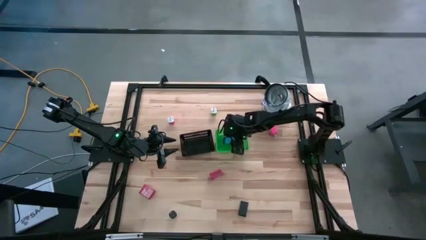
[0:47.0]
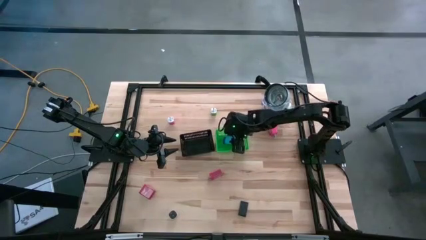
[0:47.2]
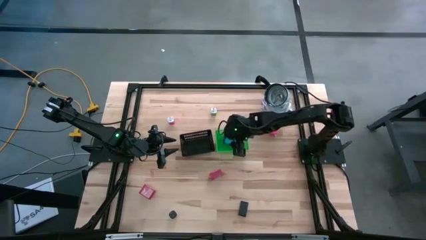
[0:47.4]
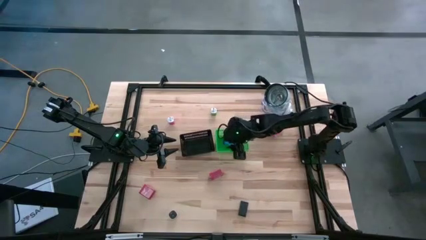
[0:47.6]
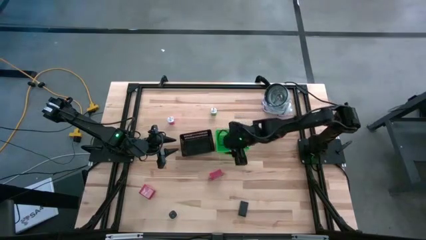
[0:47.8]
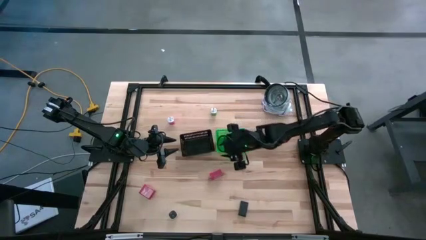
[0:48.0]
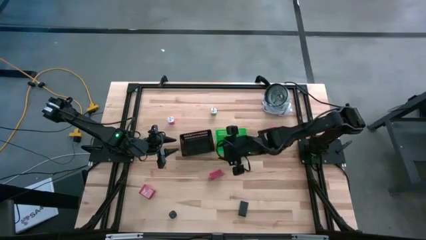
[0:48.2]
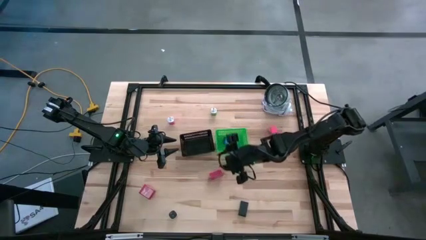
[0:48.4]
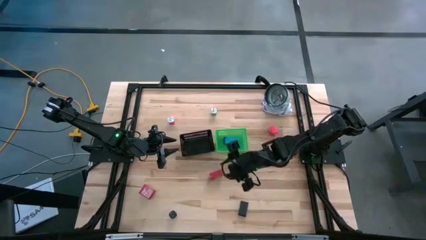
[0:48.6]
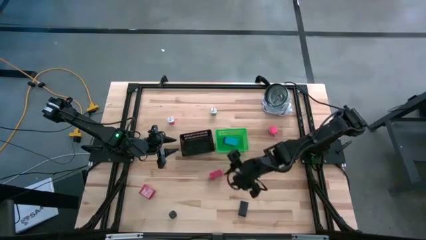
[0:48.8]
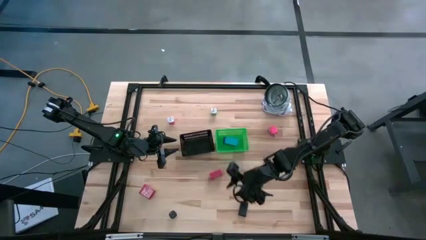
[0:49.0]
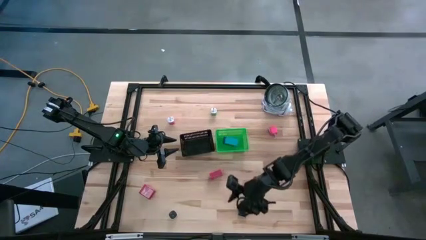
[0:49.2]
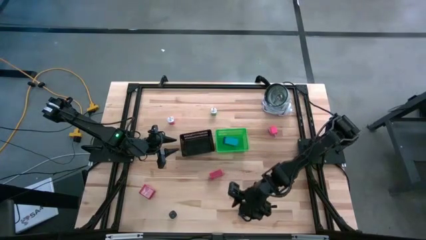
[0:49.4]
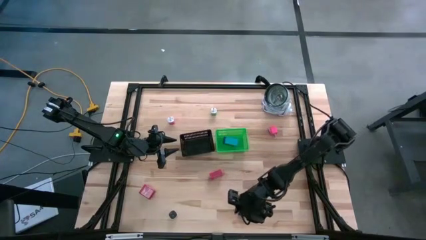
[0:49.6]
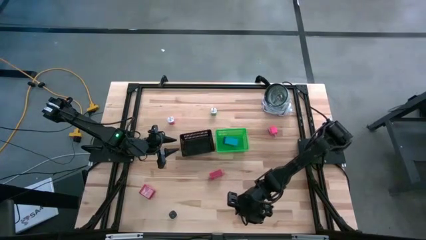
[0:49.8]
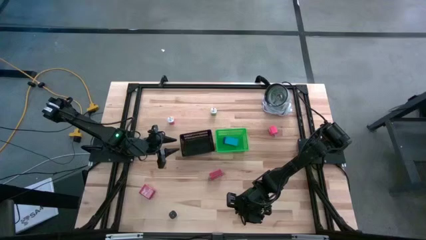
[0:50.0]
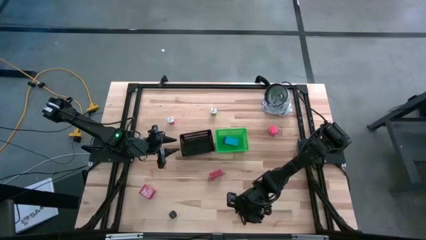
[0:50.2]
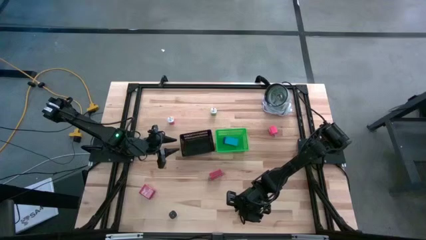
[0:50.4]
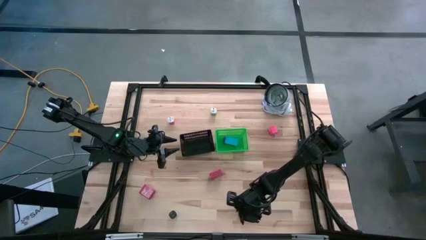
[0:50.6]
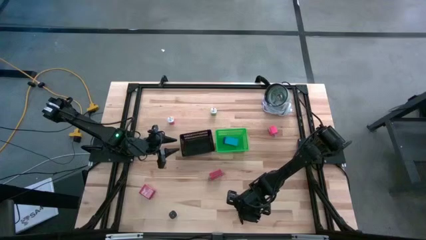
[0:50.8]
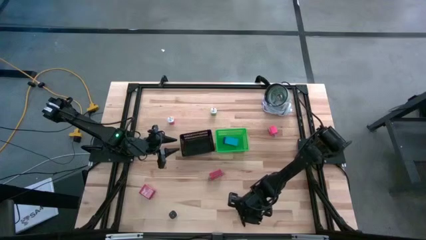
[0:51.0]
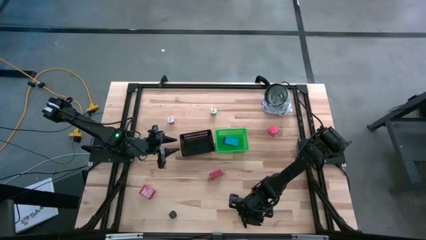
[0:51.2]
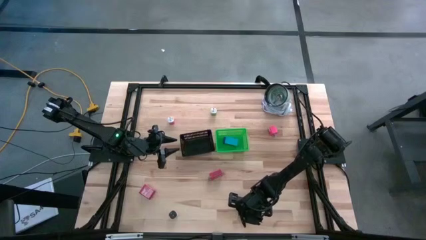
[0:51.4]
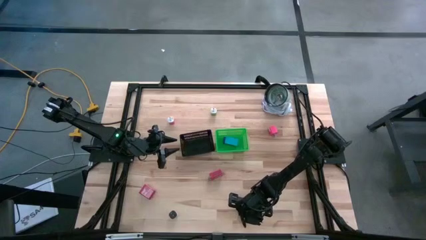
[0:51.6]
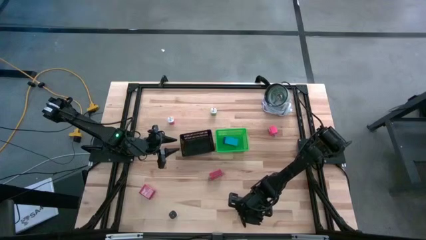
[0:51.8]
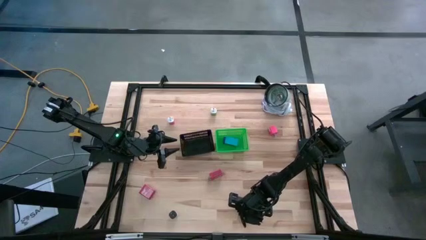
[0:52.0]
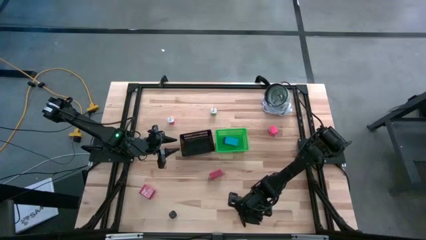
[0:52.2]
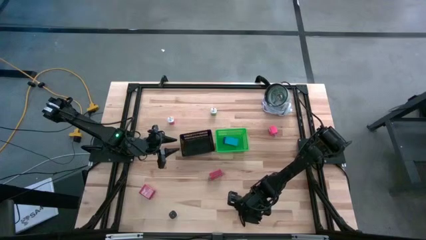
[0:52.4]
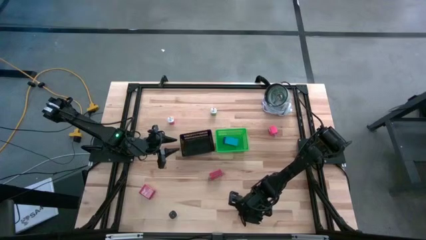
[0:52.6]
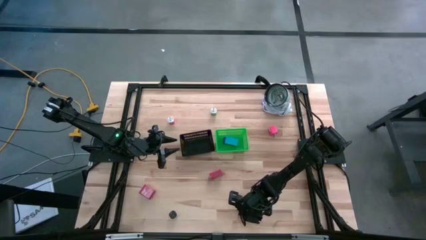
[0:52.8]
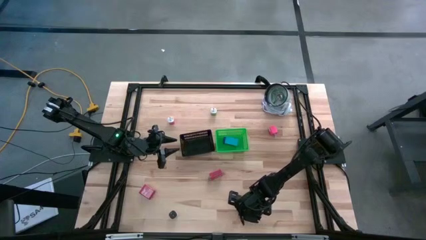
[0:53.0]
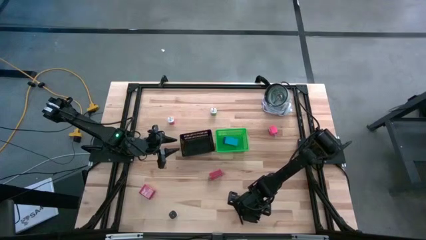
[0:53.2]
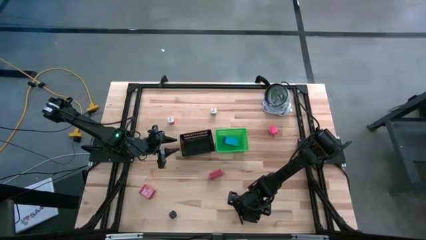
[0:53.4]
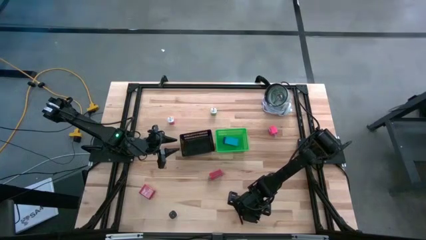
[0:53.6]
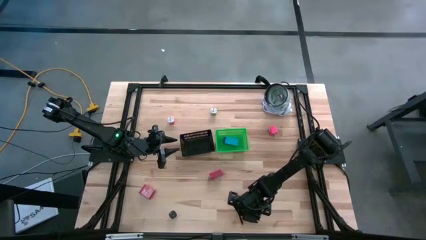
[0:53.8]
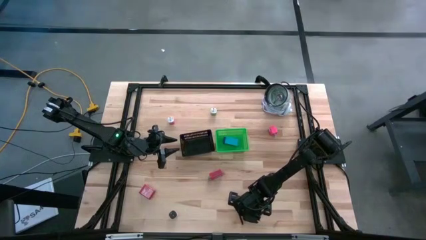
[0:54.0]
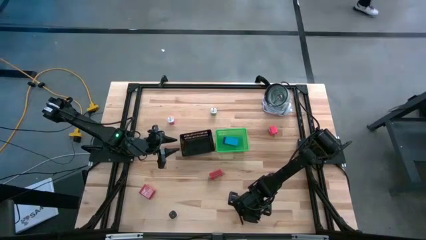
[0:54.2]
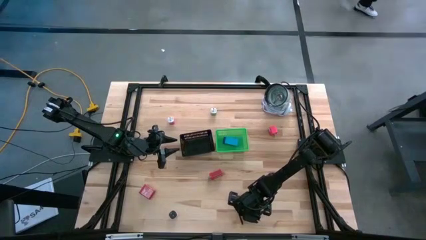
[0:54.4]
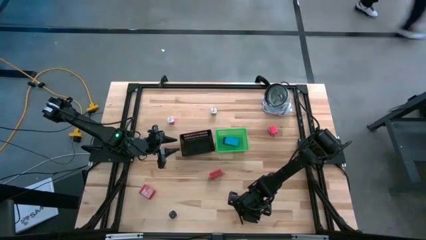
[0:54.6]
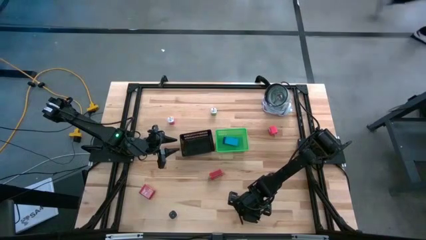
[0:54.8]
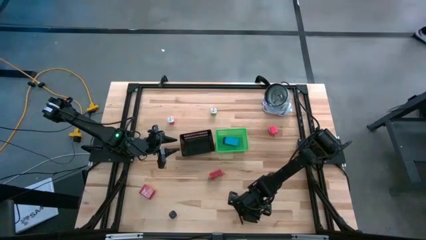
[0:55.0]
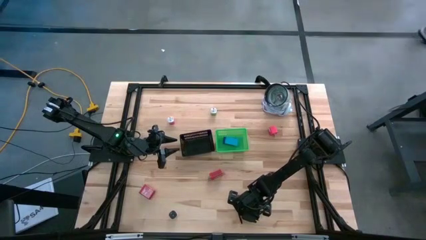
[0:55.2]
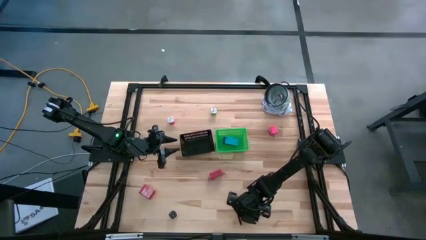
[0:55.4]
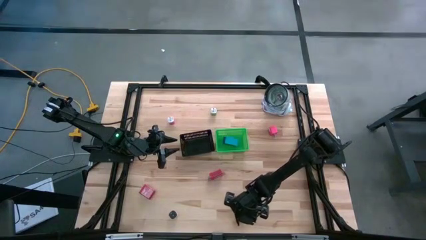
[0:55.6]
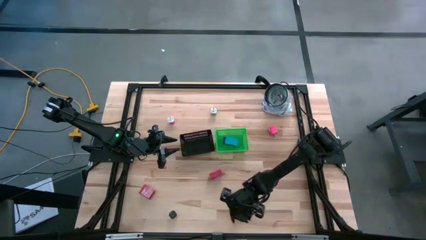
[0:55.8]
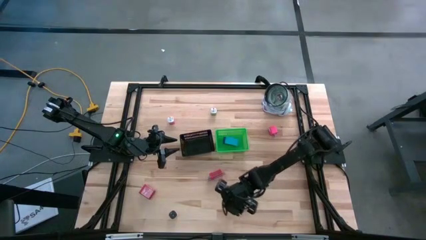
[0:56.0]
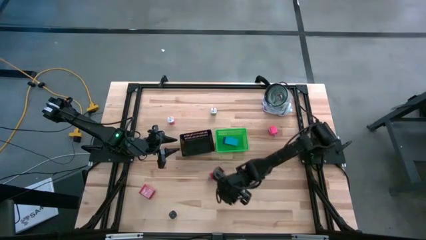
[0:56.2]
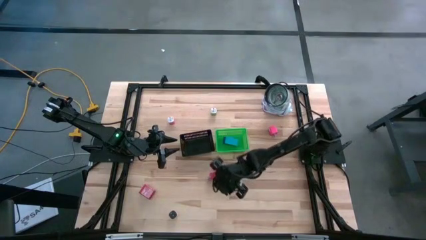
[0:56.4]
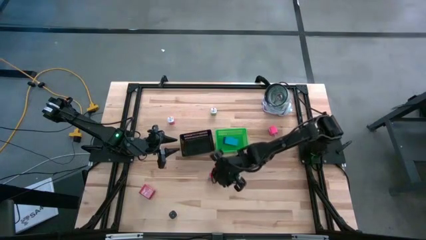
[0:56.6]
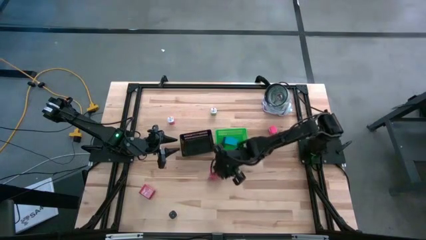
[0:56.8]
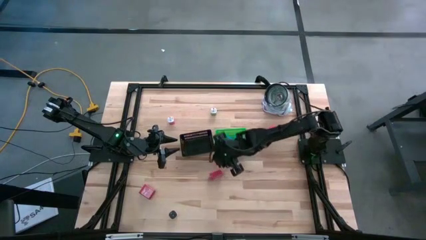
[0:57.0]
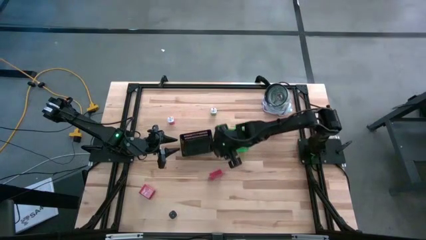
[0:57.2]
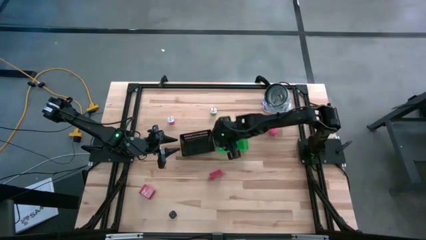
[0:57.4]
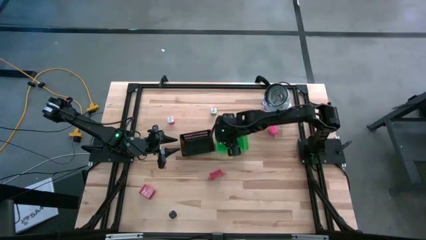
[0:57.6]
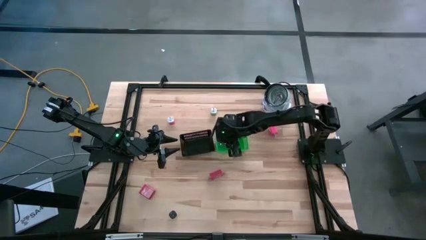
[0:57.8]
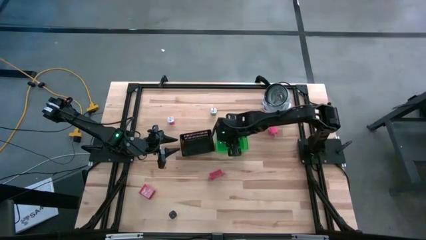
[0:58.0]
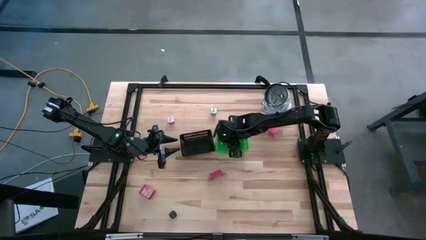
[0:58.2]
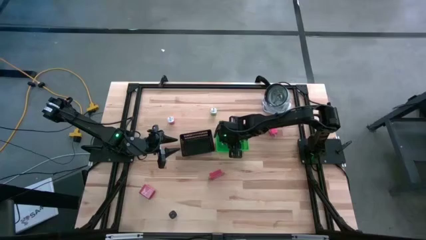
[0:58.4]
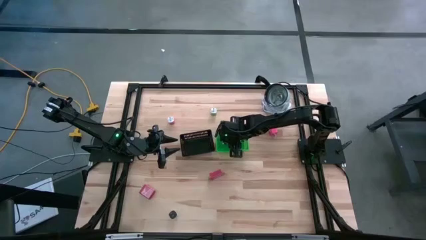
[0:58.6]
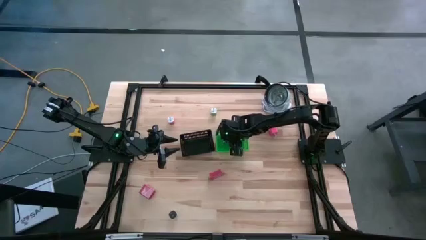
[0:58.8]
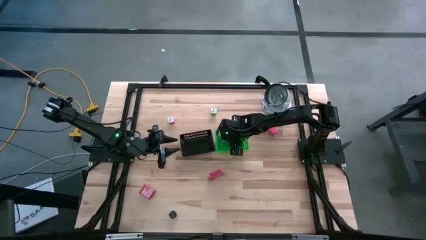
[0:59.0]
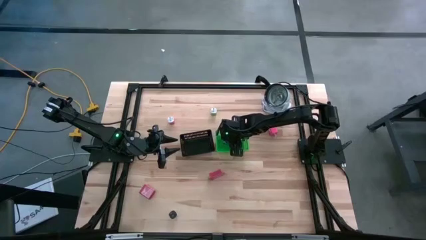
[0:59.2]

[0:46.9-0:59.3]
Task: Pick & Place Office items
Put the black digital timer into the green bin

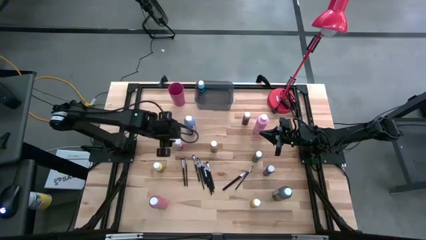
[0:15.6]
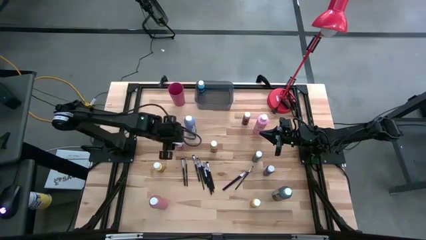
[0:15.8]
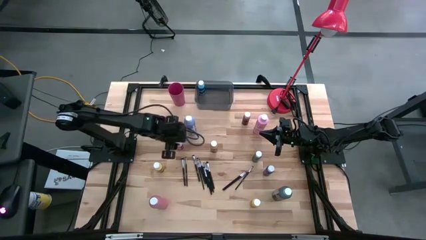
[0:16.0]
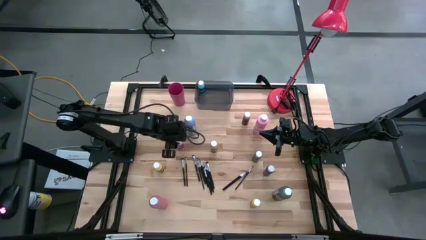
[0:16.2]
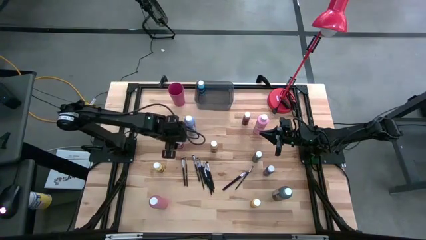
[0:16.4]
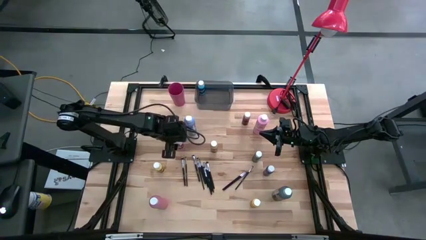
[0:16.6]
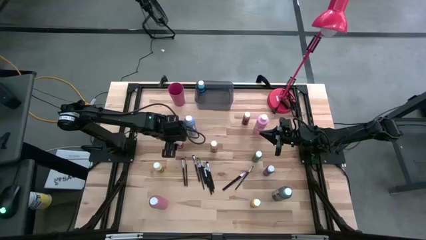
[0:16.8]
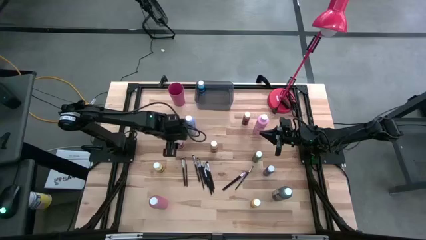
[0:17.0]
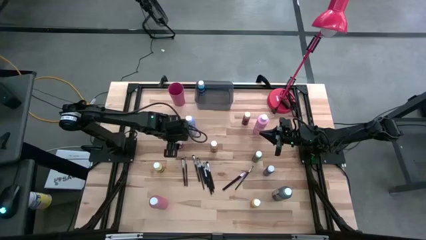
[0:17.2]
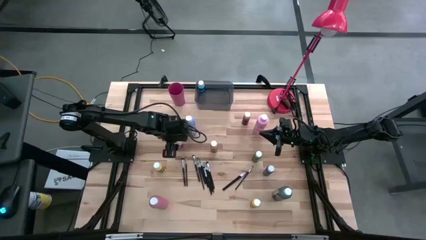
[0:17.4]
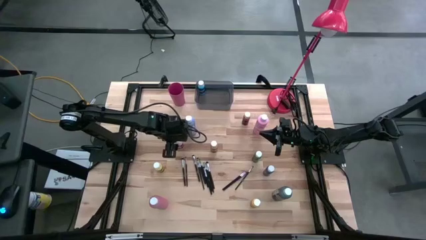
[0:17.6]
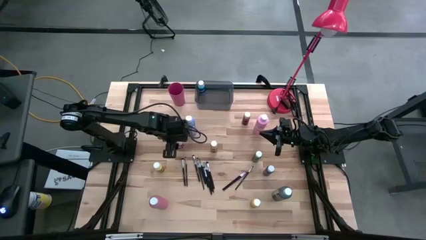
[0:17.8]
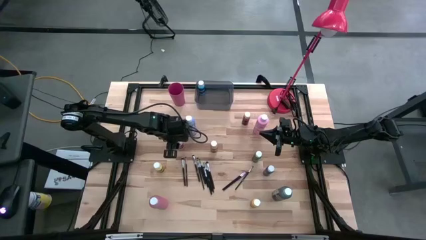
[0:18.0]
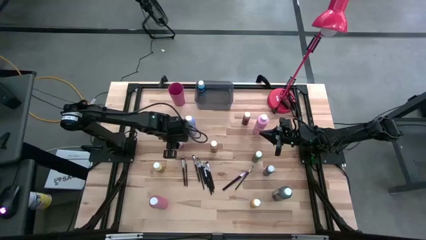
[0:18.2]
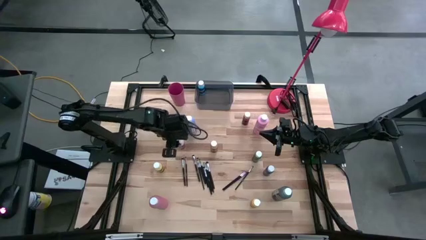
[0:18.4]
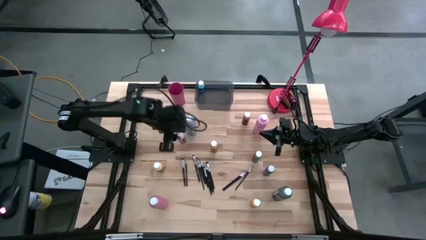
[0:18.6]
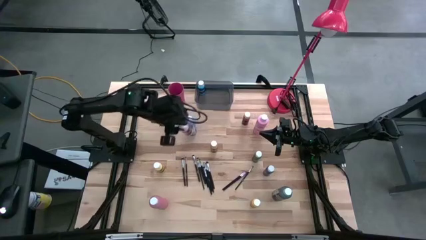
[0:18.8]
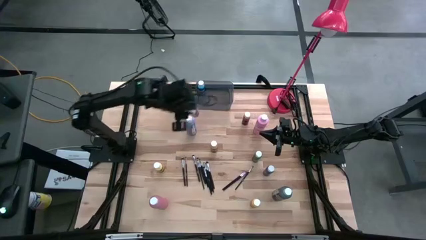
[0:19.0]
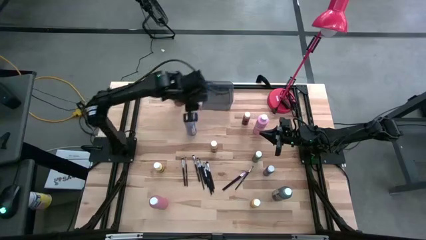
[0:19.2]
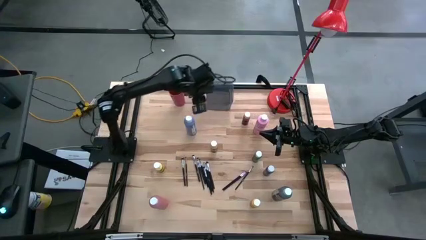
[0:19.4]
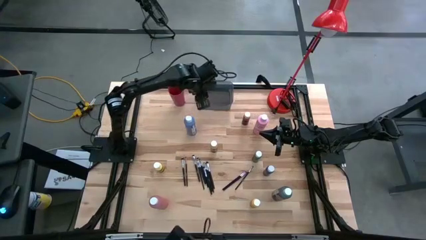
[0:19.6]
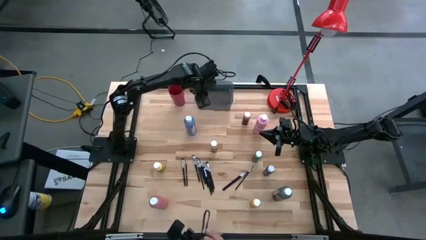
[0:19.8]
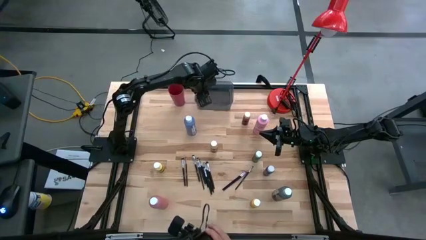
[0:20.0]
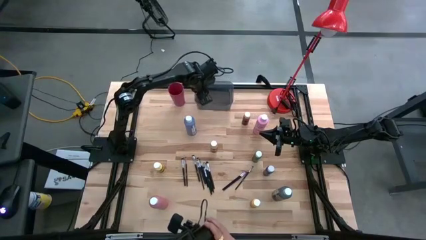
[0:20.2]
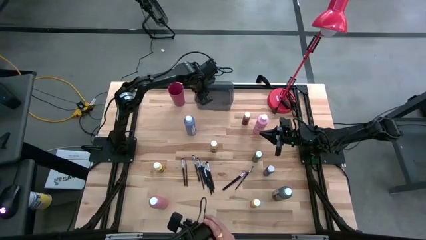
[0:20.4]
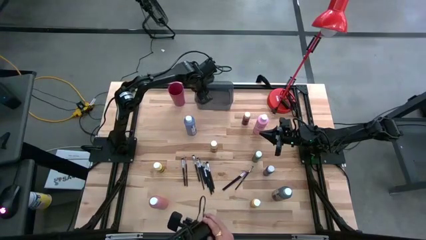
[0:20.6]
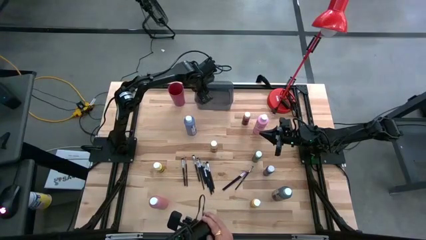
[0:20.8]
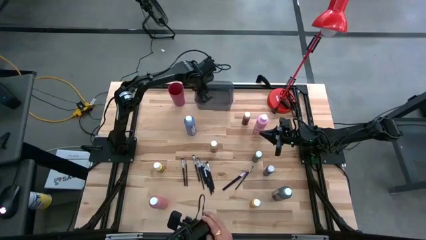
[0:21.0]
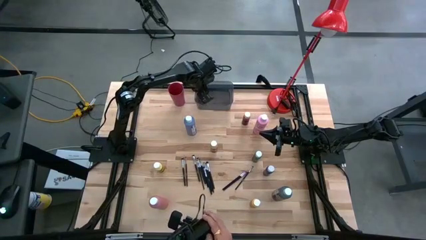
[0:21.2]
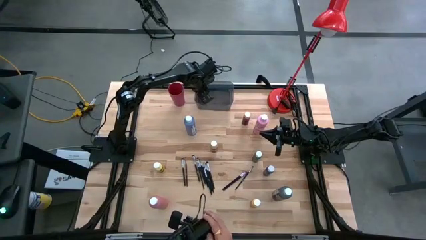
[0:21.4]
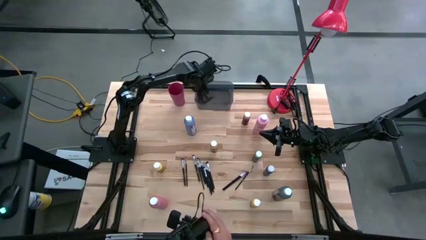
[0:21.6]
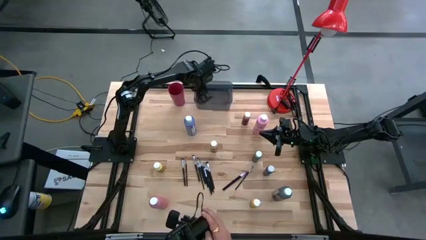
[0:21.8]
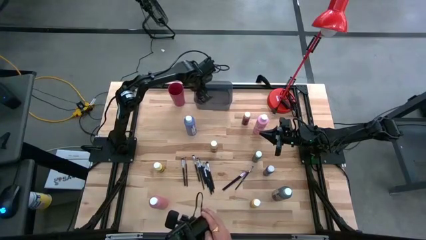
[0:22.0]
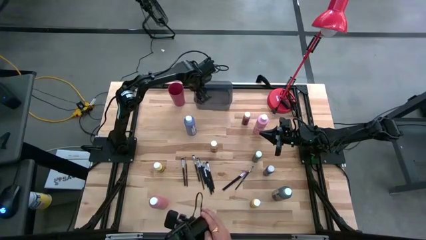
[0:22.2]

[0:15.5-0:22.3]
Task: Pick & Place Paint Supplies
Put the pink paint bottle into the black bin
